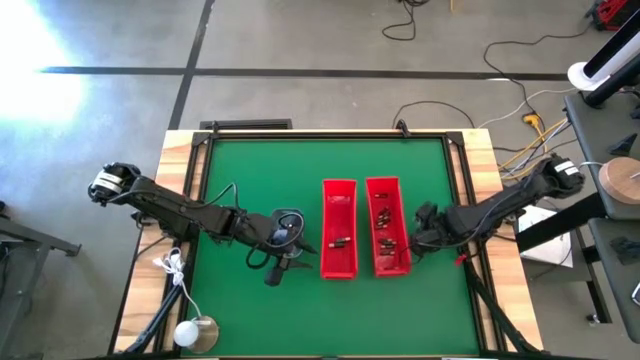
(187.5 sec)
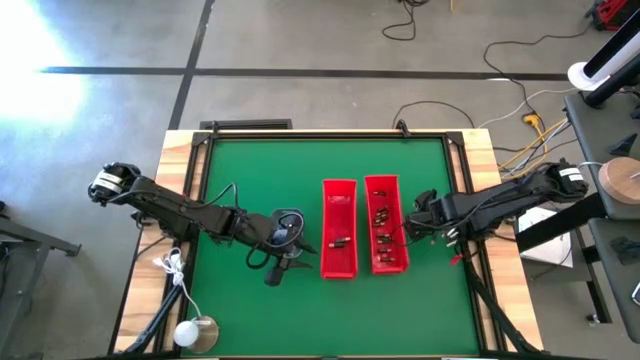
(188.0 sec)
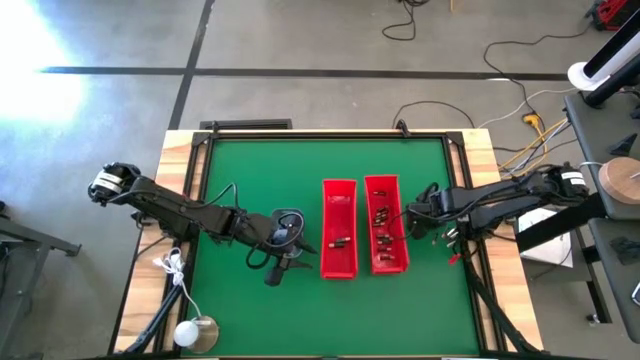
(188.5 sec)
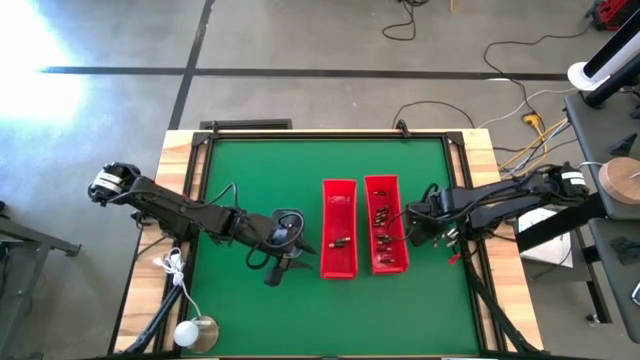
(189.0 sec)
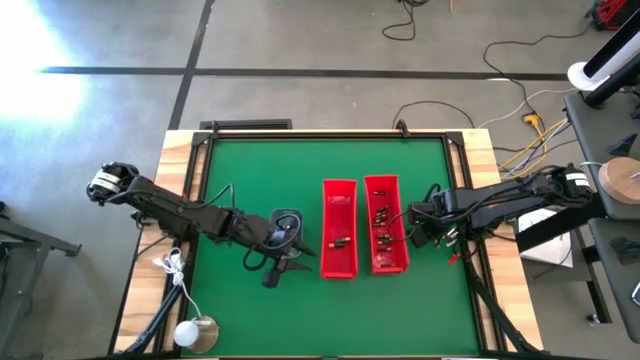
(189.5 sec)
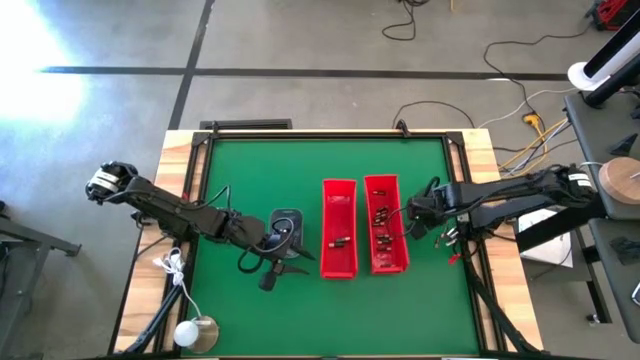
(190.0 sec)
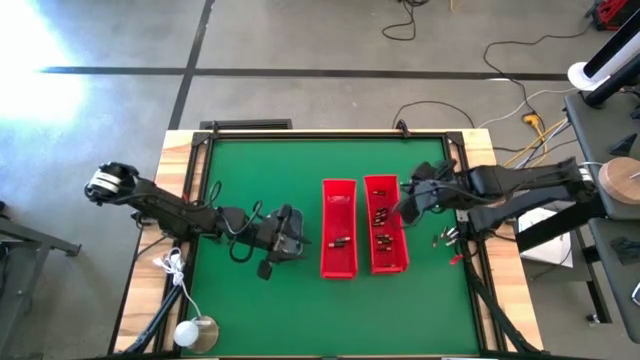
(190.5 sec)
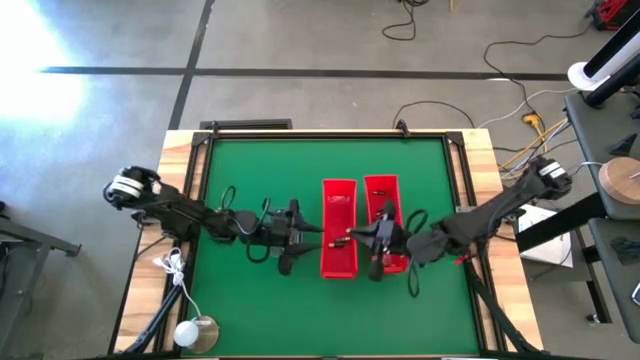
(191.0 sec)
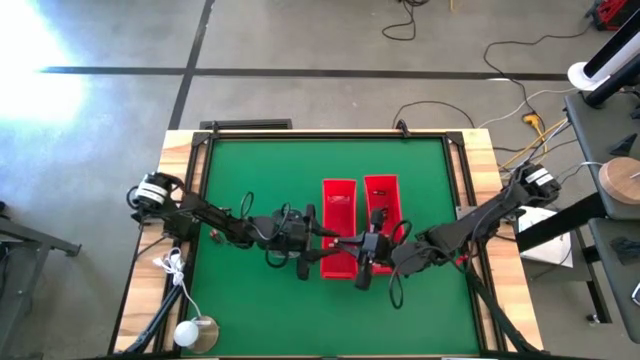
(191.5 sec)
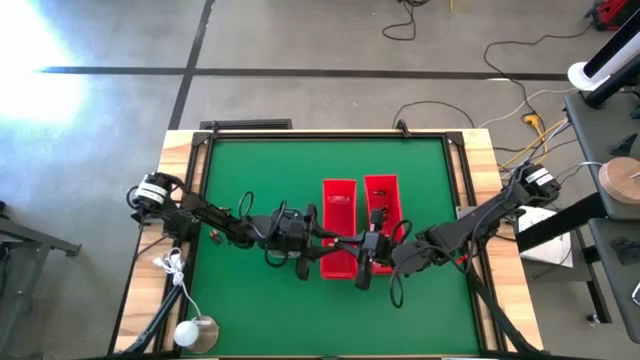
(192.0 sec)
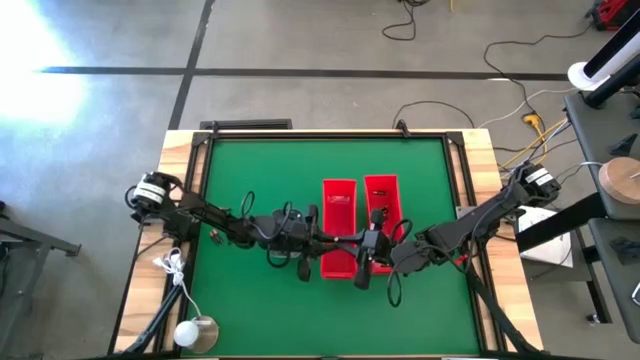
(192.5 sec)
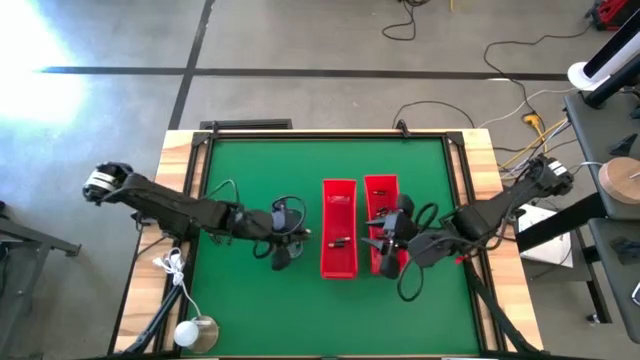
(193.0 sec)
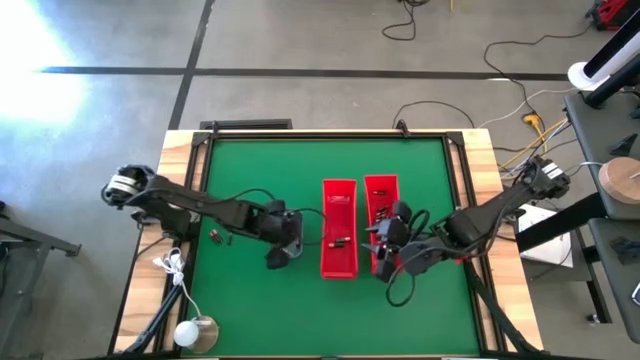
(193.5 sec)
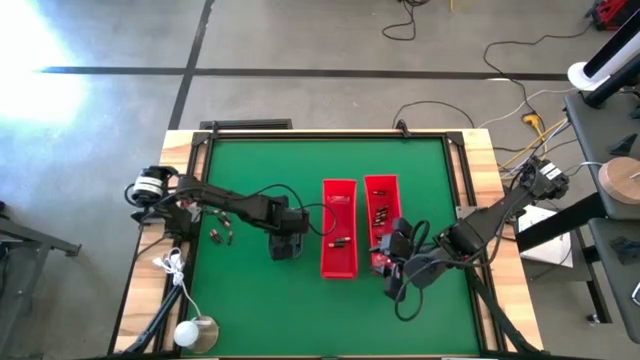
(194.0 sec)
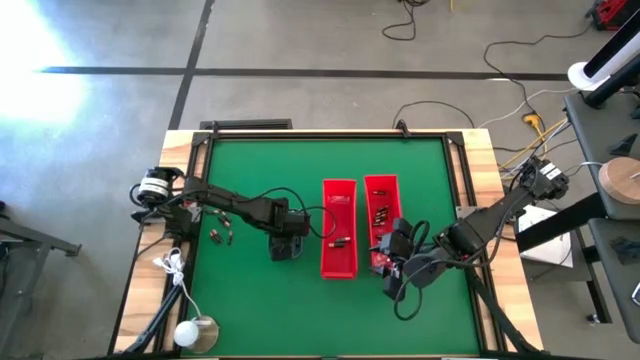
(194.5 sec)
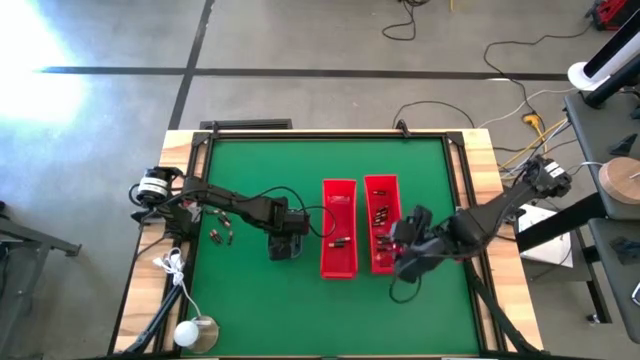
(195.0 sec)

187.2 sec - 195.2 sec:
Task: Sort batteries
Put the silver battery into the gray bin

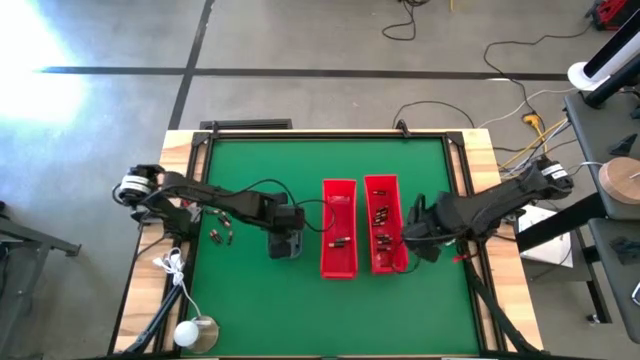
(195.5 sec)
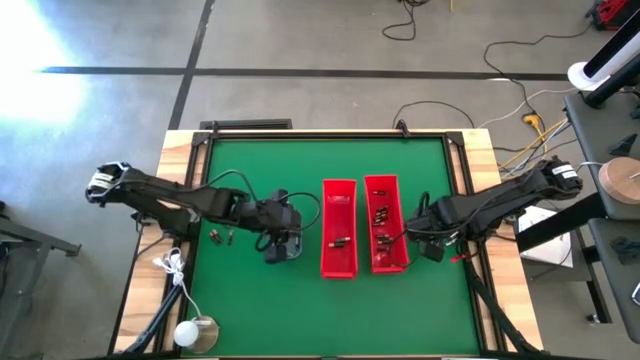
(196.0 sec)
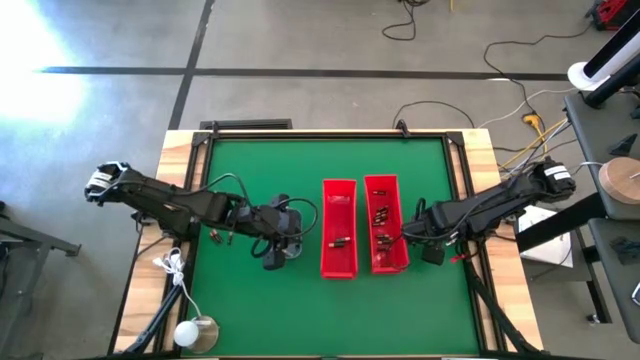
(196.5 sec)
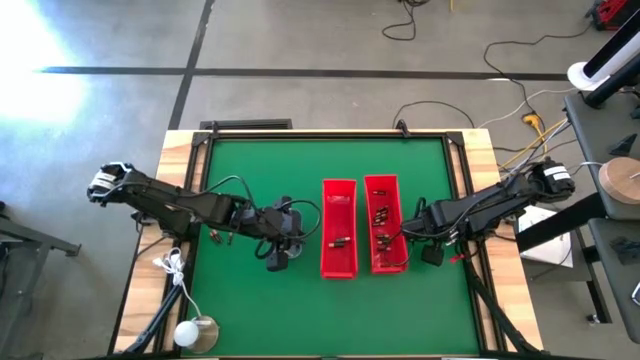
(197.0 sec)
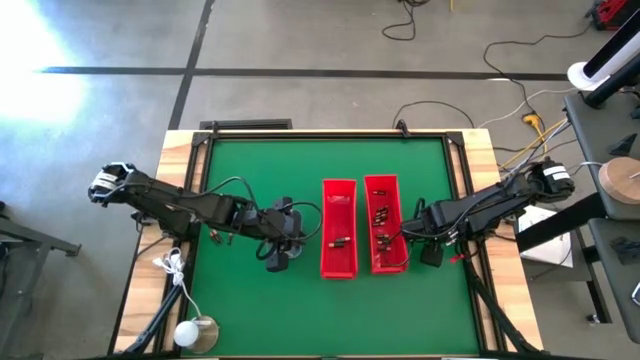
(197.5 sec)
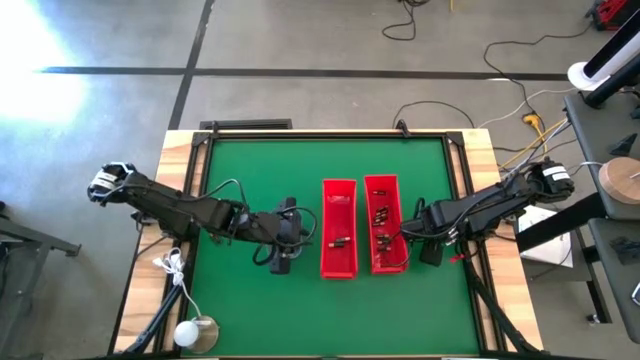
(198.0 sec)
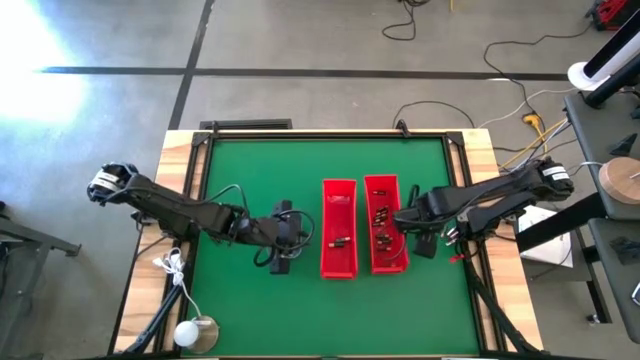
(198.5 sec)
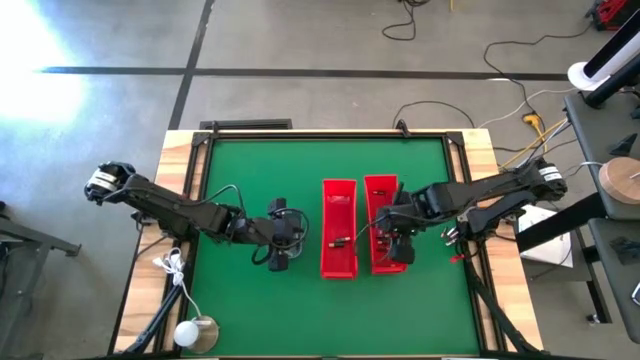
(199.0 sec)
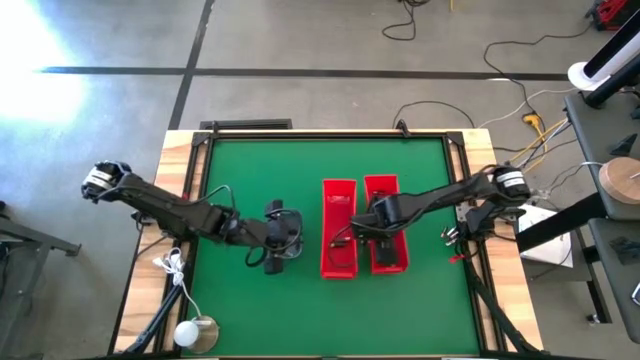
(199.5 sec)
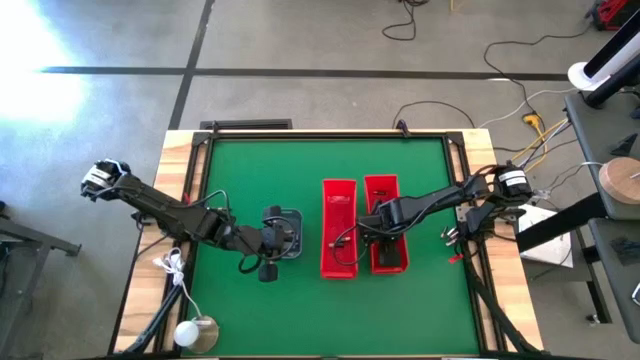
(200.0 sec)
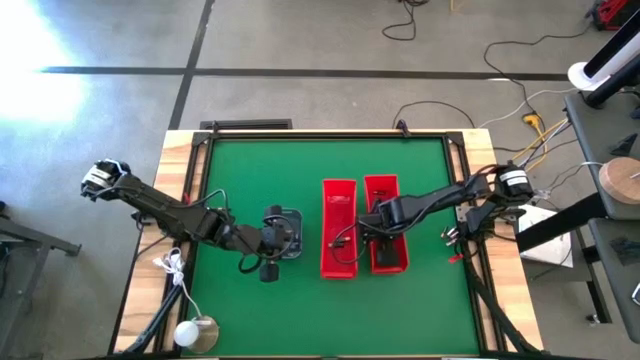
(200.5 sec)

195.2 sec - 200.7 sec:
Put the small black battery into the right red bin

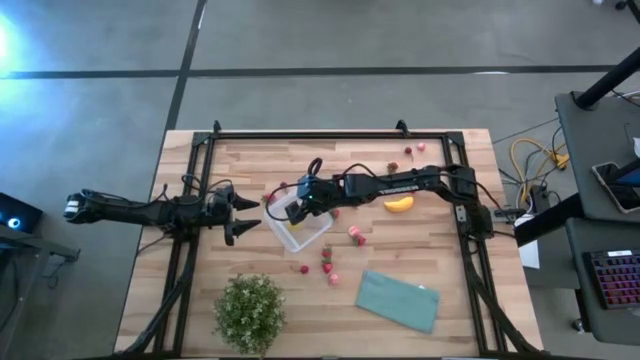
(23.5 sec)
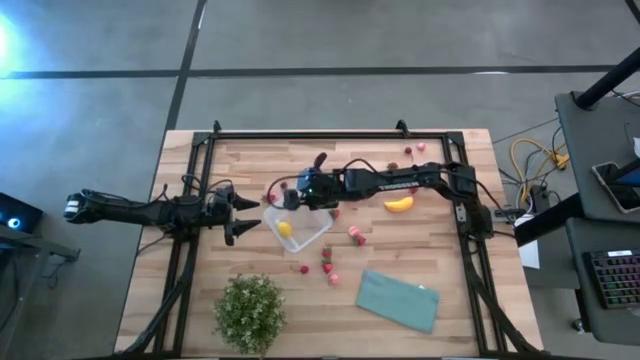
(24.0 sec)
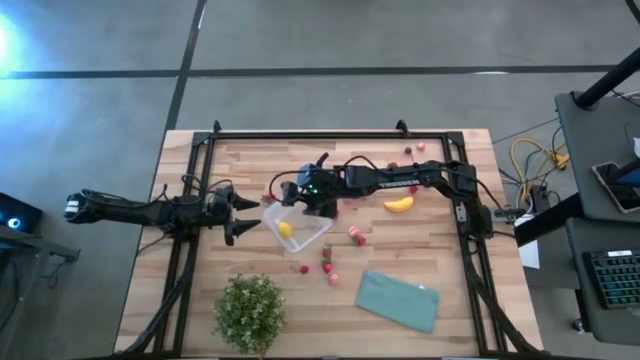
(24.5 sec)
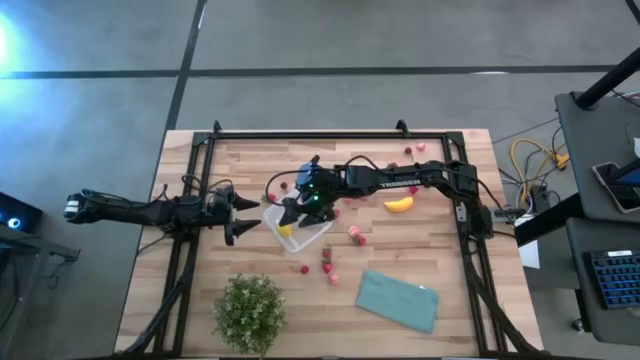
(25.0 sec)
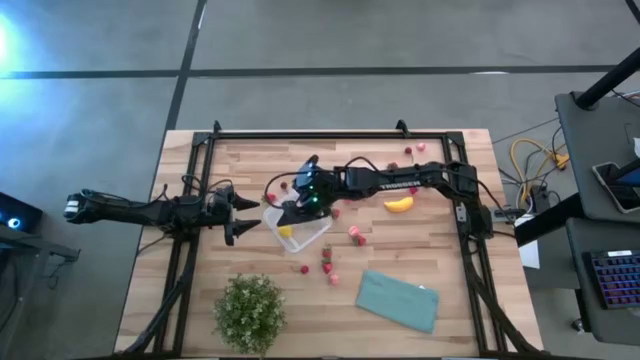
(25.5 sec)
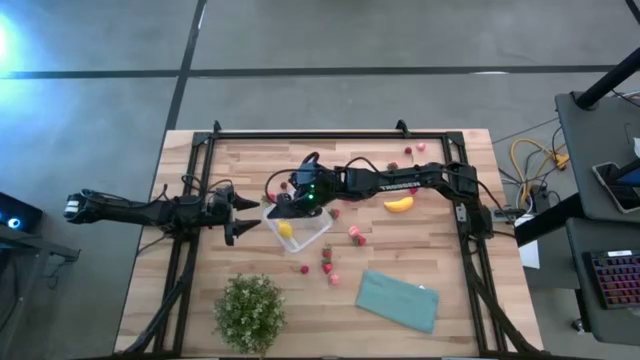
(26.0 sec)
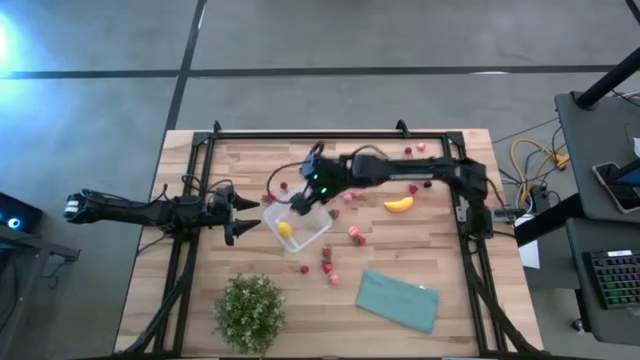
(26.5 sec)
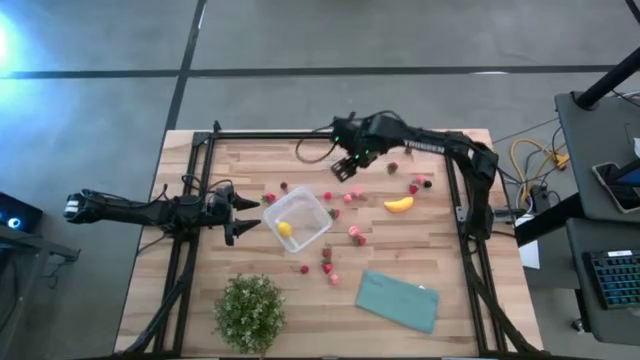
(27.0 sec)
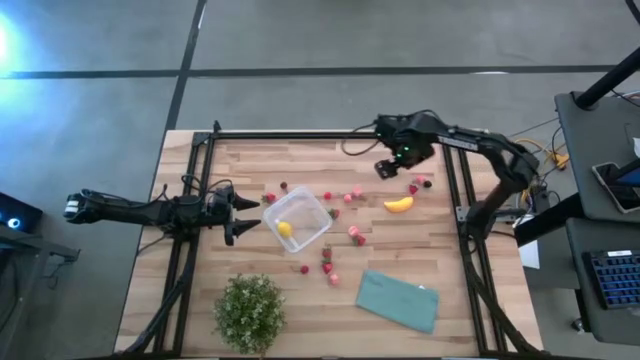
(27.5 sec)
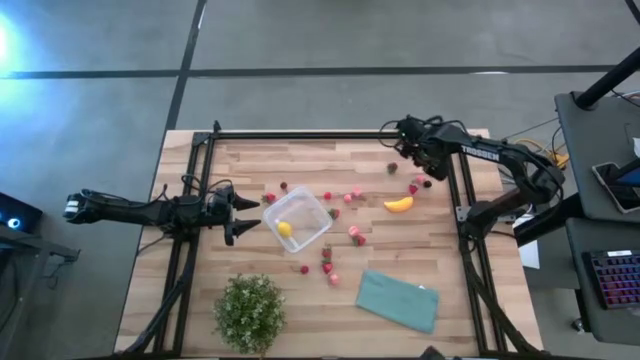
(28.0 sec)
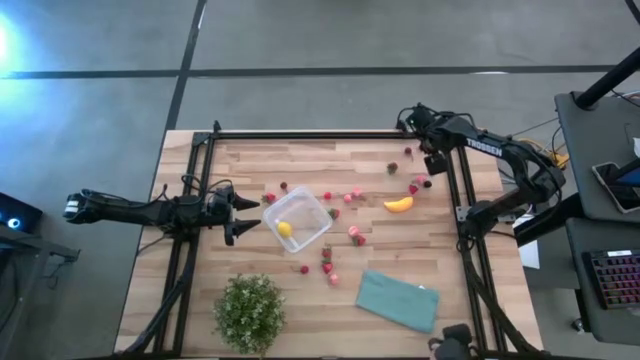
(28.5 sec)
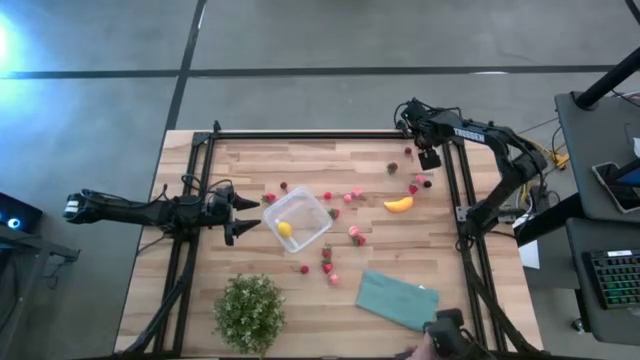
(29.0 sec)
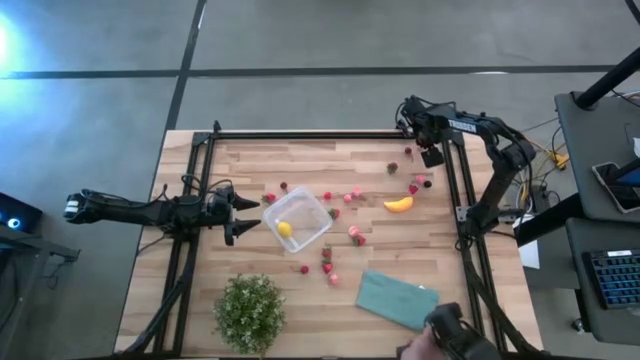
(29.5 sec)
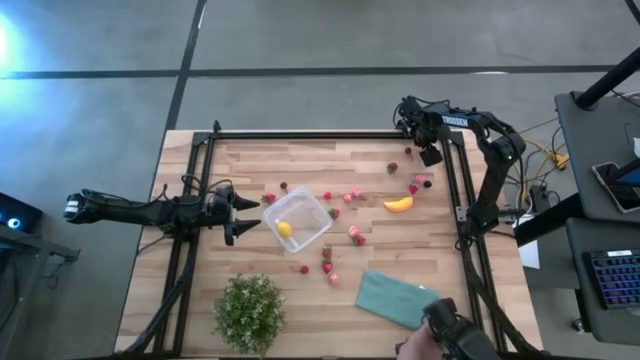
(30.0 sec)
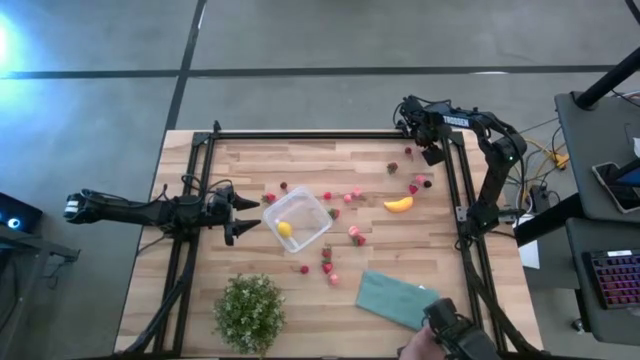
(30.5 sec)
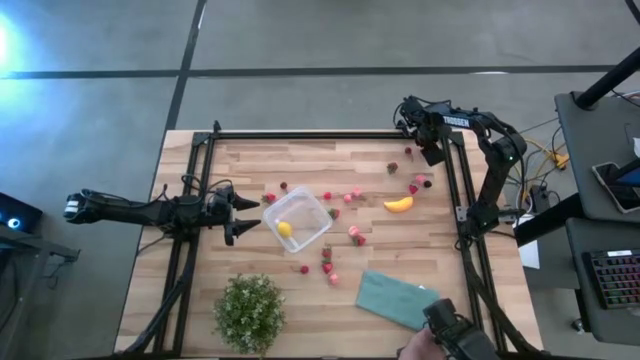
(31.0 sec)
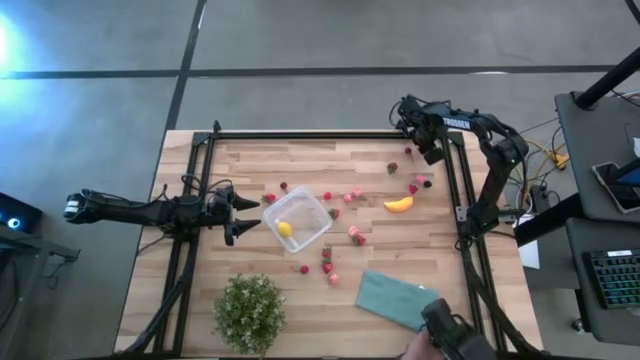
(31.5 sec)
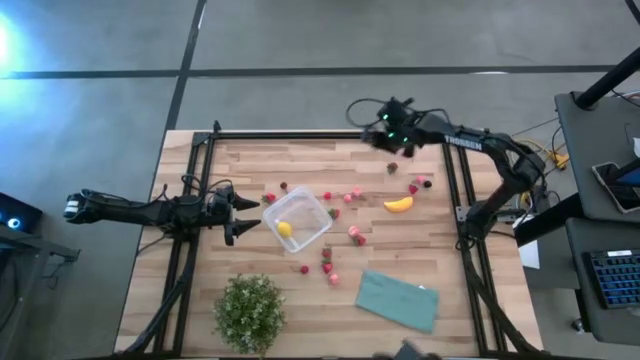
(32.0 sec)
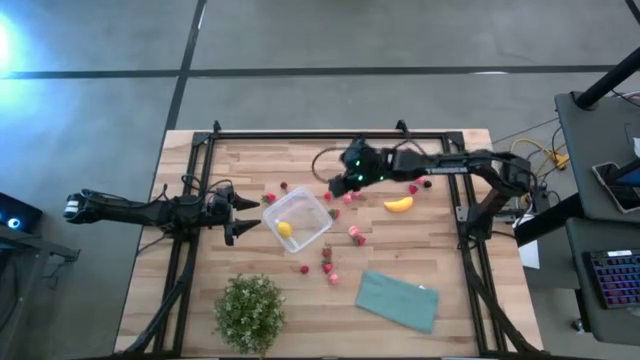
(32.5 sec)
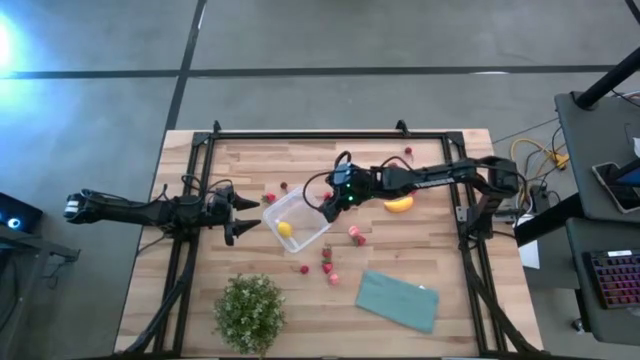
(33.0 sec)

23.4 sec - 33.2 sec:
Task: Pick and placing Produce into tupperware
Put the pink peach into the transparent bin
